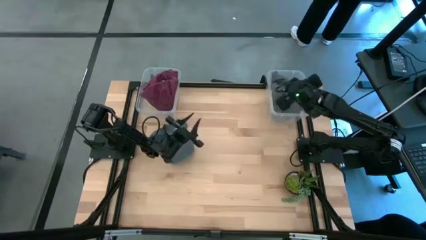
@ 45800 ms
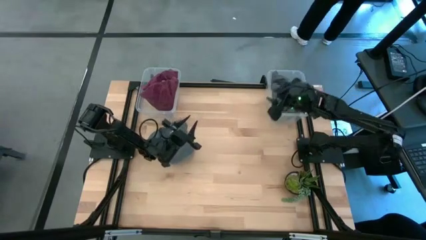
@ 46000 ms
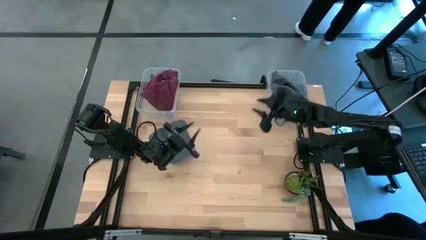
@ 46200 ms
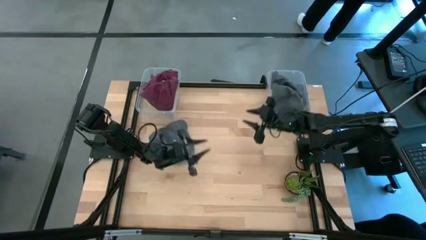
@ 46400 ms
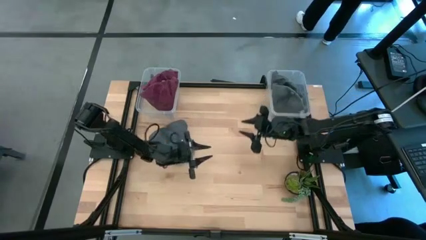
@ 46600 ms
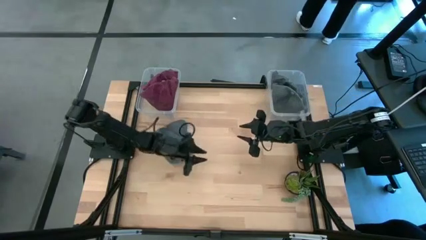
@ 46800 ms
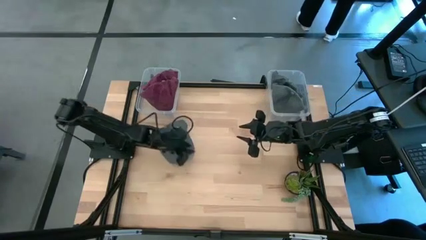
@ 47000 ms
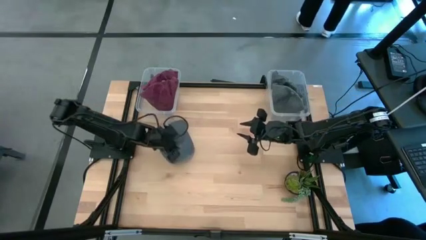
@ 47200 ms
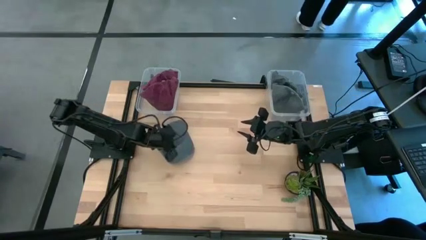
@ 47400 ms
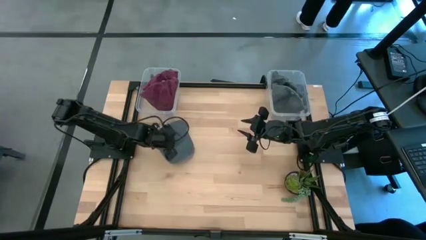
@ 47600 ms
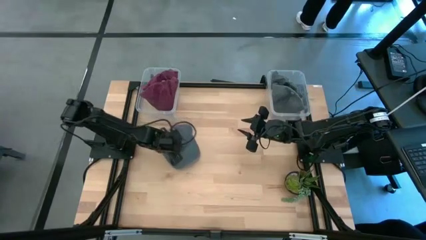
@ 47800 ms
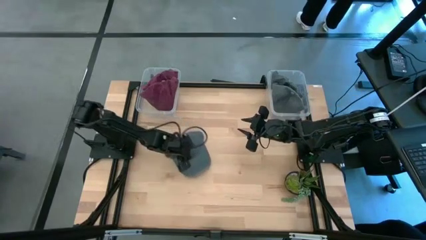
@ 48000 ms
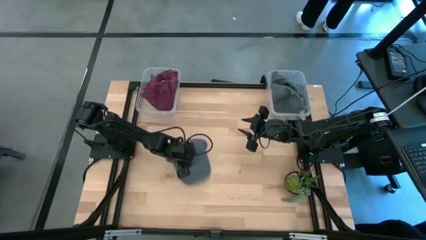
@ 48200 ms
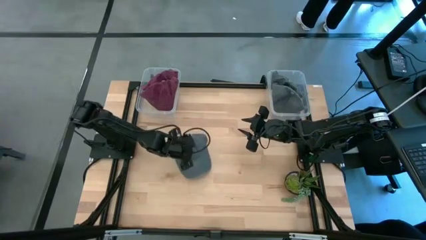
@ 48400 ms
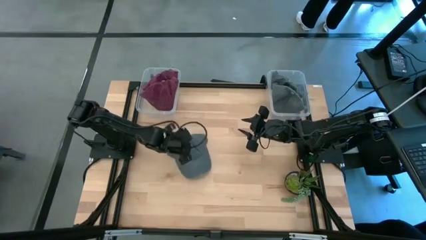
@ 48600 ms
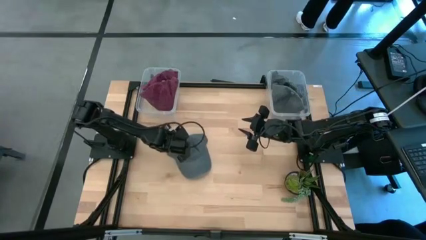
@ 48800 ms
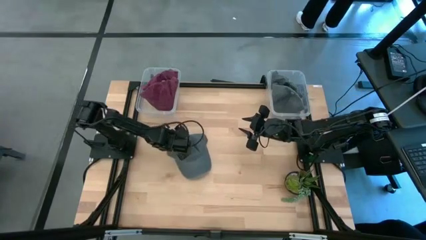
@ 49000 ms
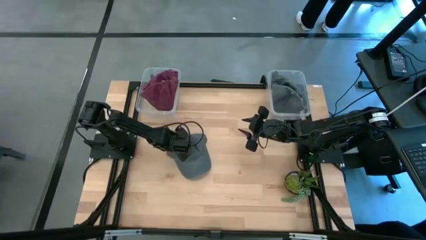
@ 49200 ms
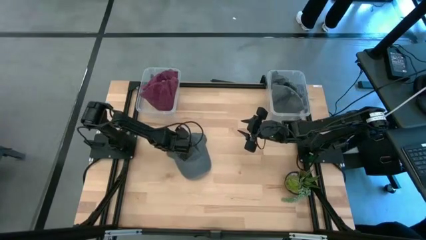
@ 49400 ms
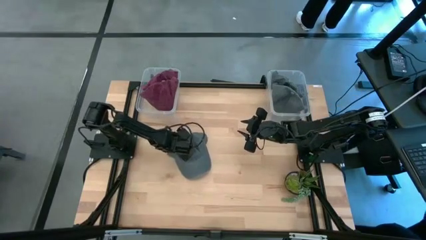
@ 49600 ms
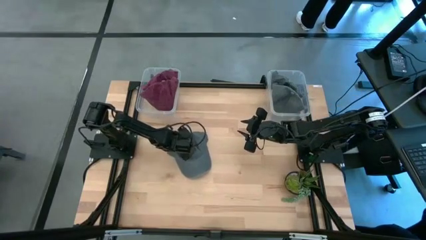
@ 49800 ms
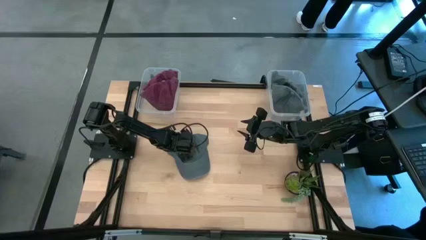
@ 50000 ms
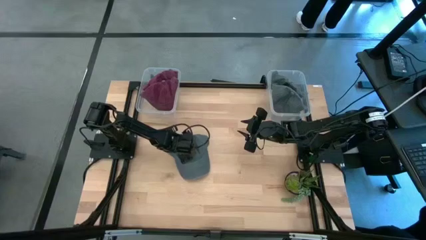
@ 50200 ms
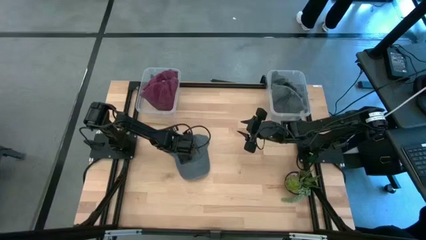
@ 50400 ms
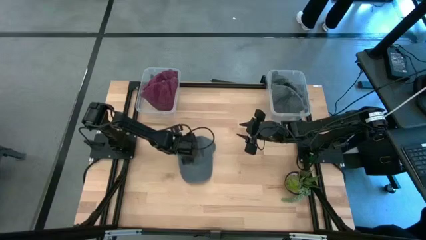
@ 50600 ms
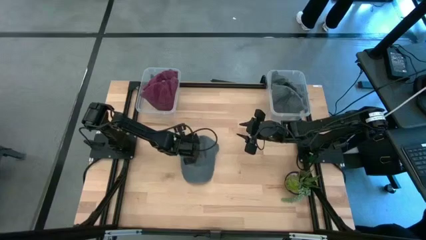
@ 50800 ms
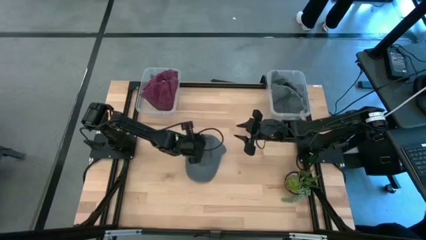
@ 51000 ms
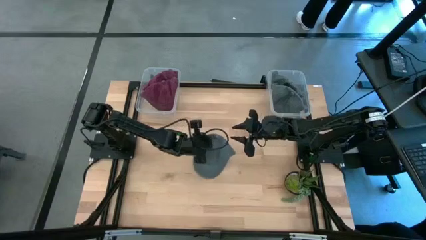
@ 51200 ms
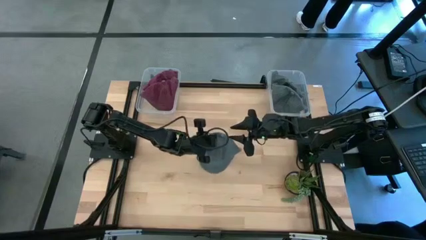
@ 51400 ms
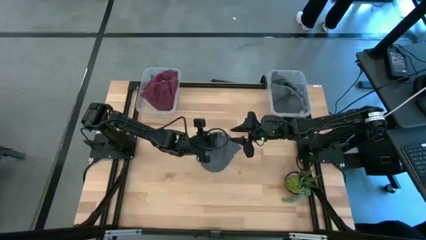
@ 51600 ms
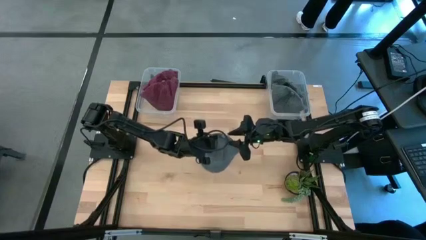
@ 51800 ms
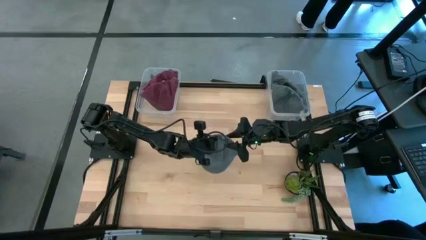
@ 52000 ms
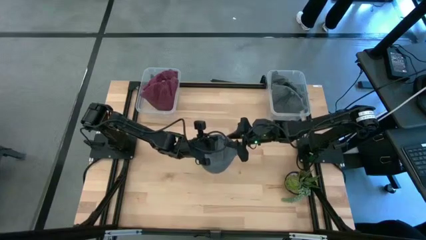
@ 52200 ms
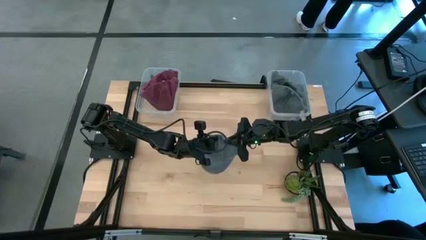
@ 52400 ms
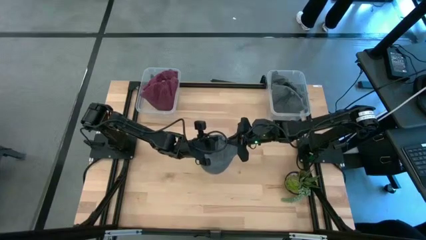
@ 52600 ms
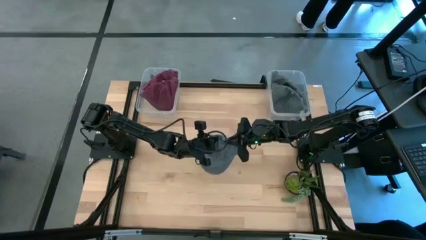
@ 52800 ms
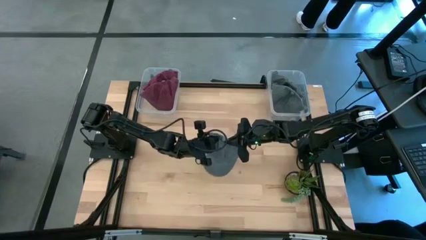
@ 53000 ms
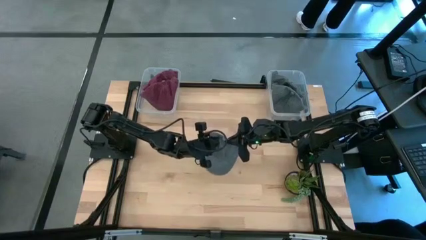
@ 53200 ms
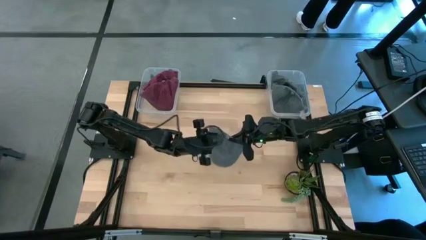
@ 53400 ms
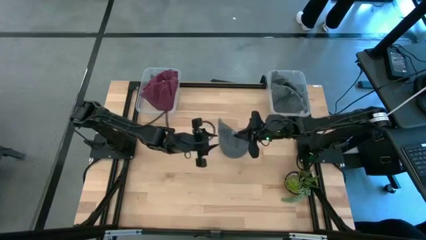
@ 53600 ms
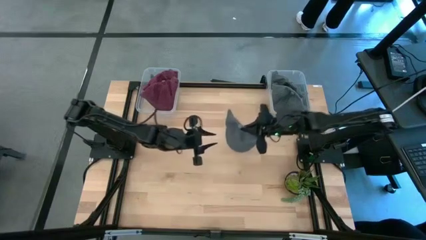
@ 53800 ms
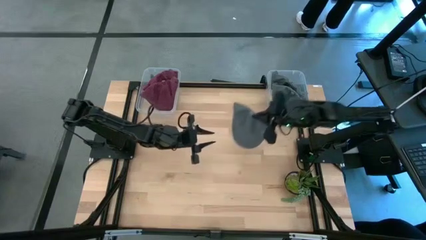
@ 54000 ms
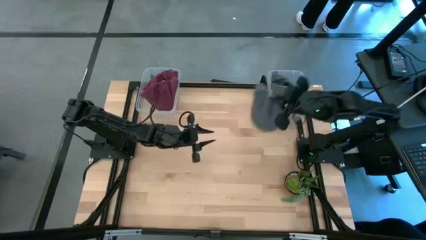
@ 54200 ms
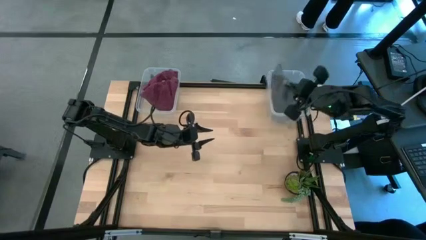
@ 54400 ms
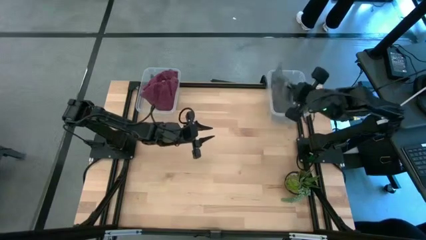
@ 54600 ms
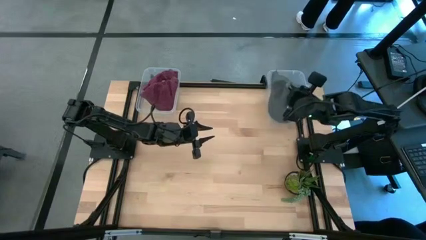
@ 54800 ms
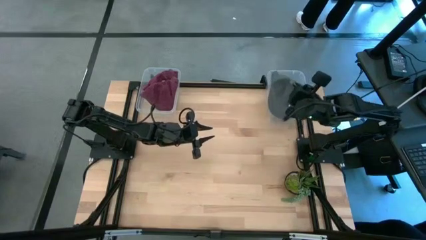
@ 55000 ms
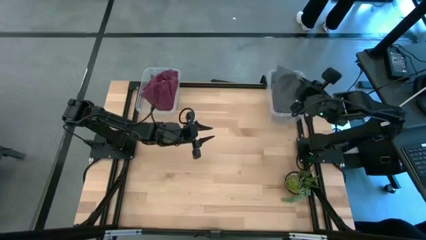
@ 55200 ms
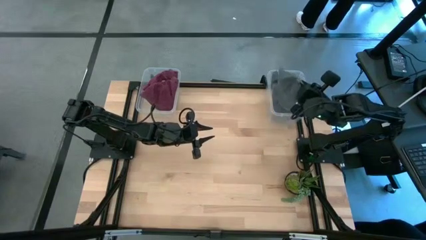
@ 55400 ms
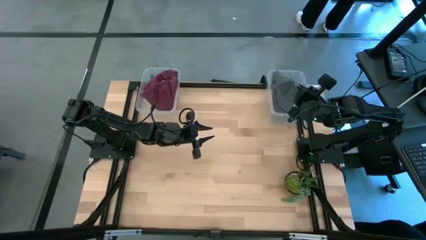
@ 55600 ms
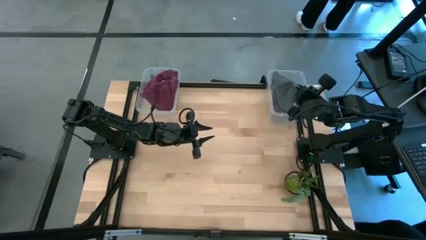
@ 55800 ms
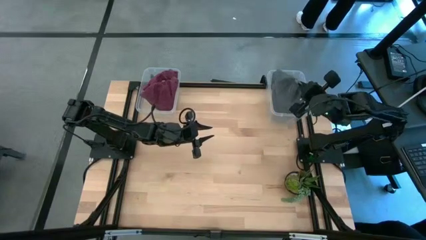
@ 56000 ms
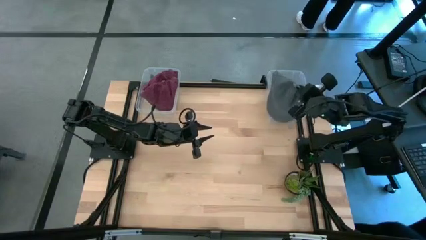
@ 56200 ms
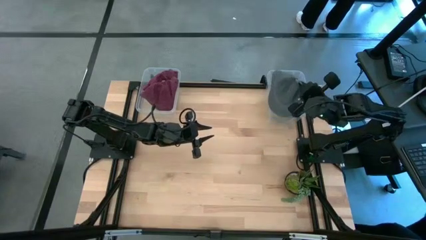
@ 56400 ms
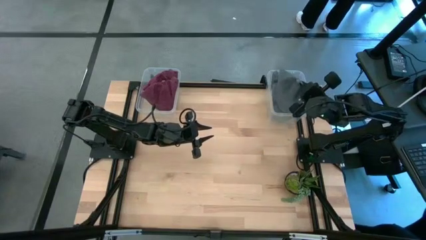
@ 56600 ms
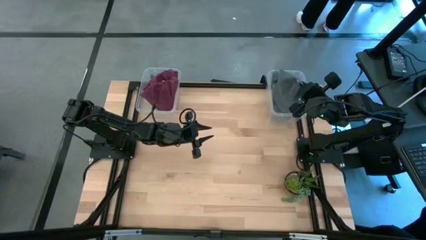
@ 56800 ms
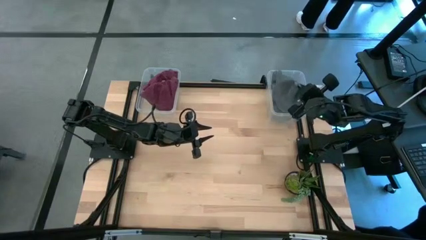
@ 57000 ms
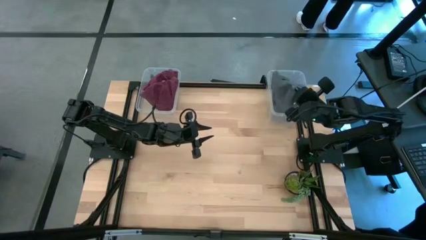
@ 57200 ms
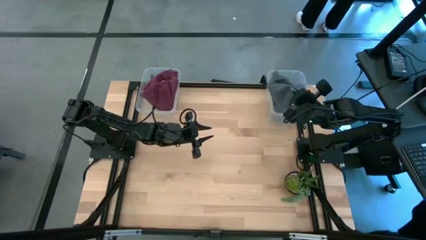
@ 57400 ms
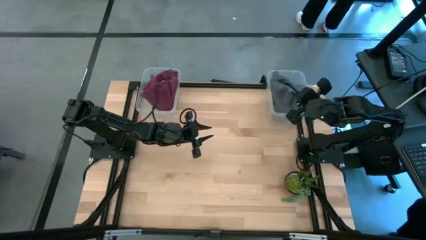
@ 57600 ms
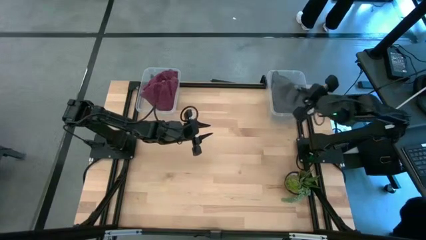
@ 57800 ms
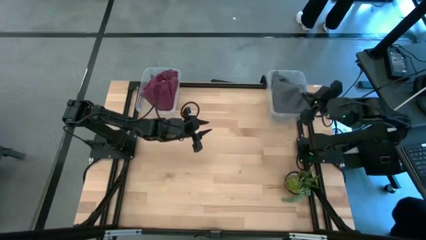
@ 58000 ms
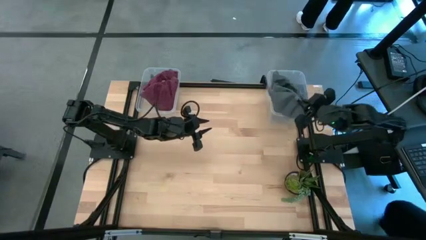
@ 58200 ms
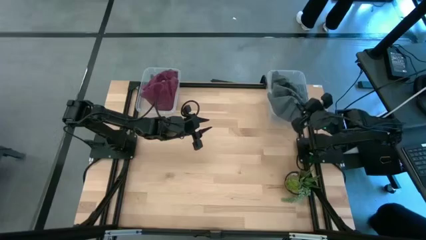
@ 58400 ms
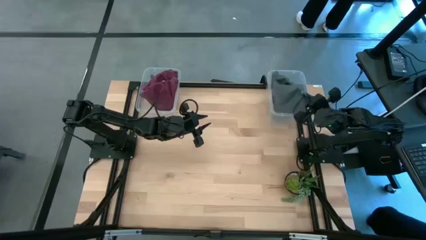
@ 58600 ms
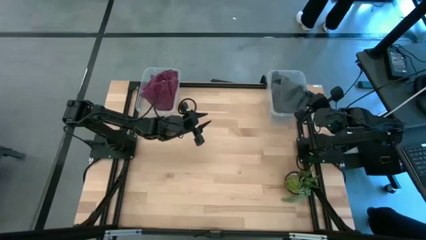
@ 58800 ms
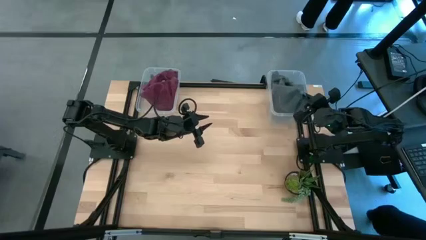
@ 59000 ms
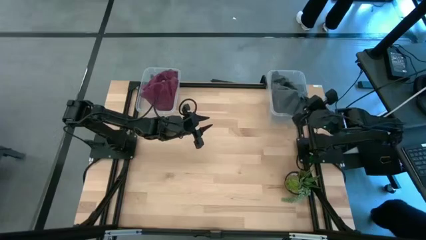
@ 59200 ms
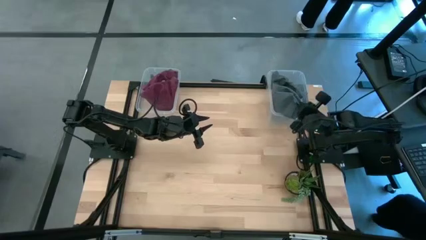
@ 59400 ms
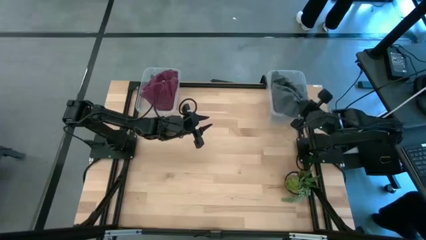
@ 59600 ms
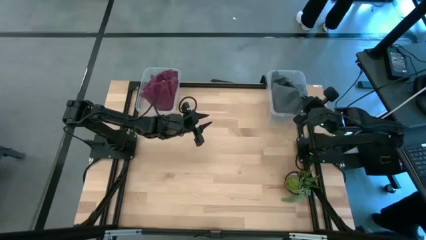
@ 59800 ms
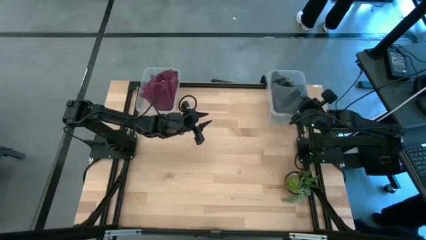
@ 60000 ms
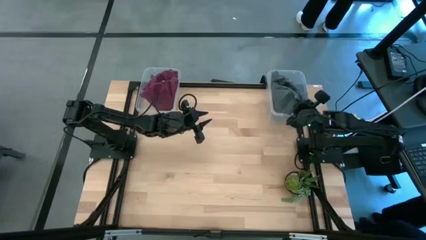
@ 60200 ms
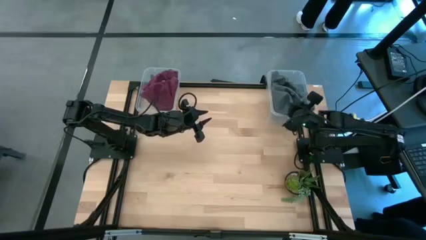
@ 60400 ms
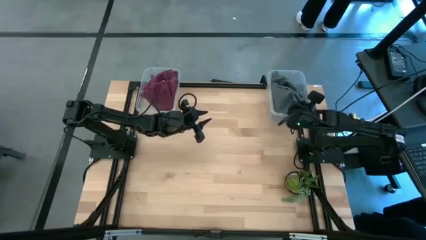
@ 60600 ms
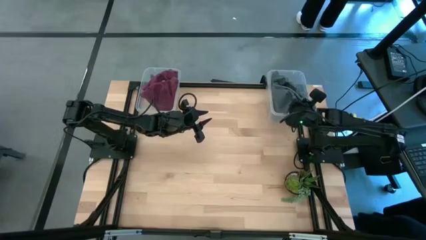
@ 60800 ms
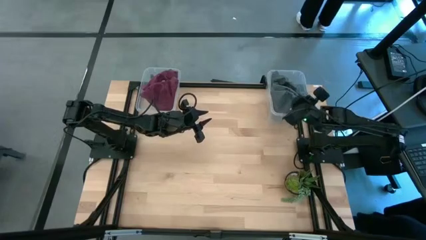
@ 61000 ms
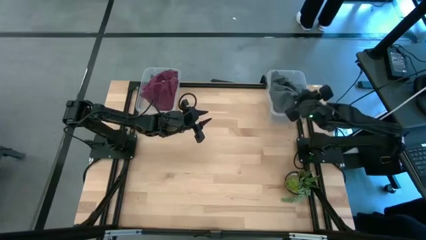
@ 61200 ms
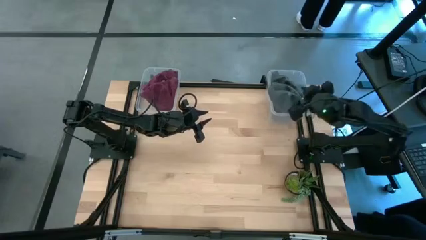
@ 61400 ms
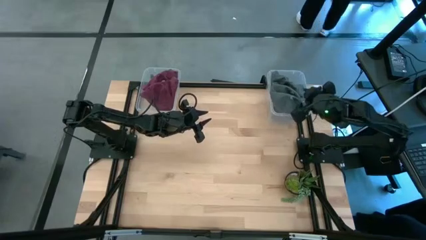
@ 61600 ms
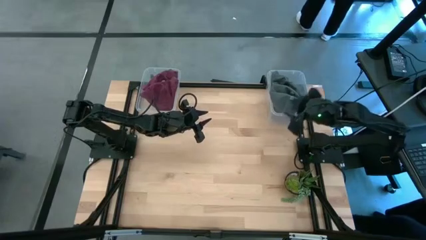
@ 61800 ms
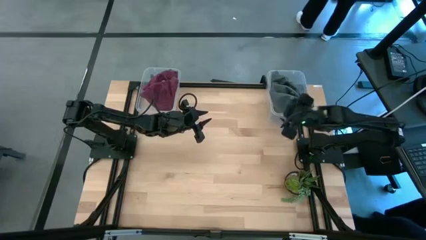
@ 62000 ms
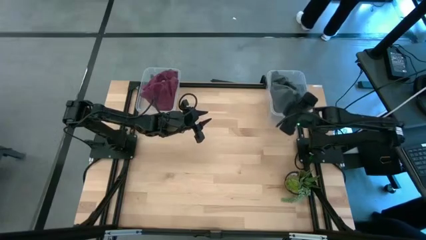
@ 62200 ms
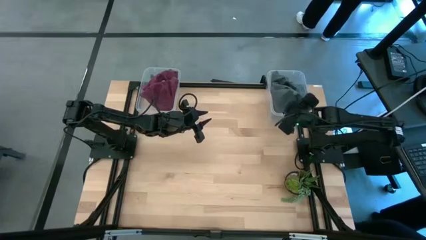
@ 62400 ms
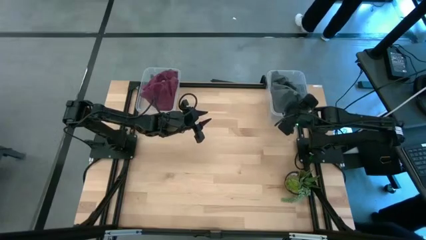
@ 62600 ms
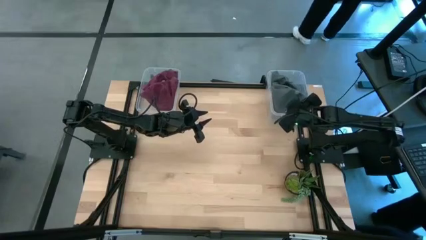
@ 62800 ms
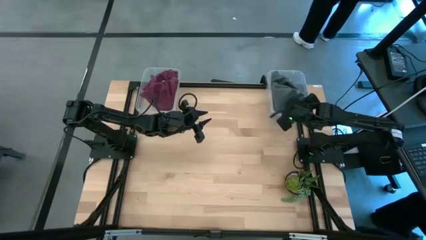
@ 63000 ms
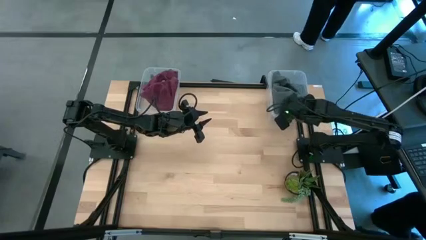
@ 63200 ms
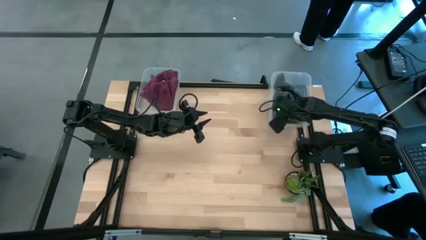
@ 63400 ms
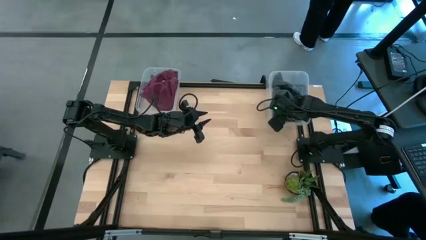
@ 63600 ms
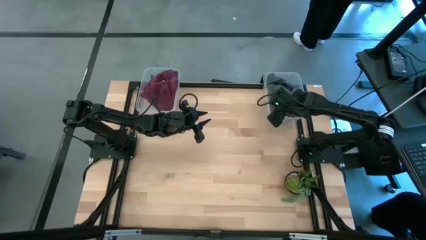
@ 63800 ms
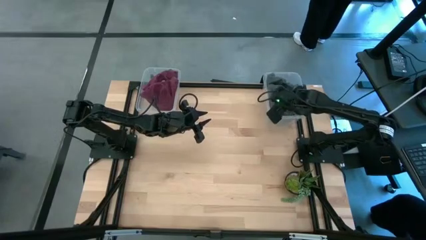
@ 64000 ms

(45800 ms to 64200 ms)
Task: Pick & Place hat
Put the gray cap into the right transparent bin
